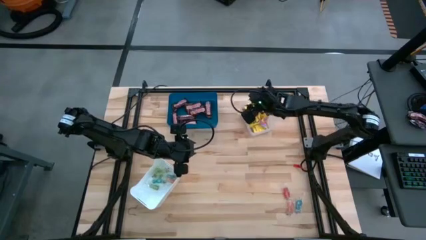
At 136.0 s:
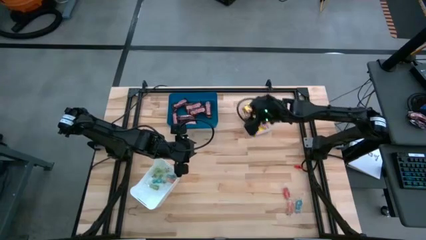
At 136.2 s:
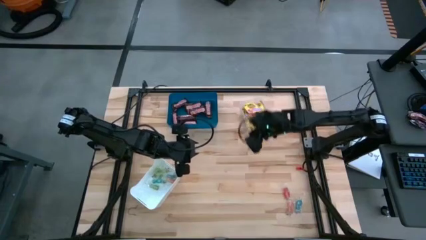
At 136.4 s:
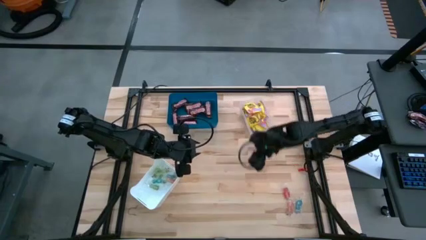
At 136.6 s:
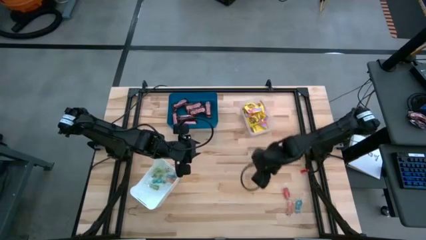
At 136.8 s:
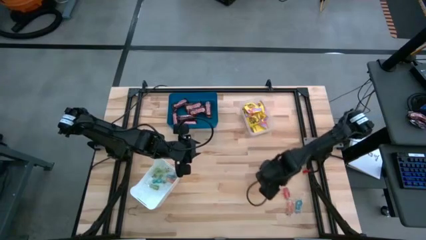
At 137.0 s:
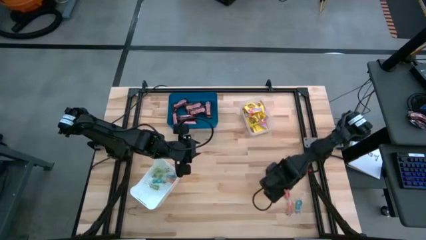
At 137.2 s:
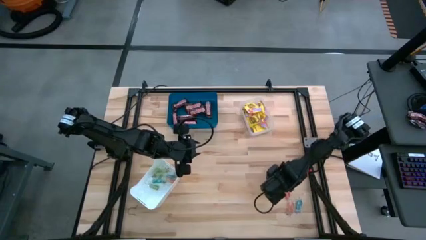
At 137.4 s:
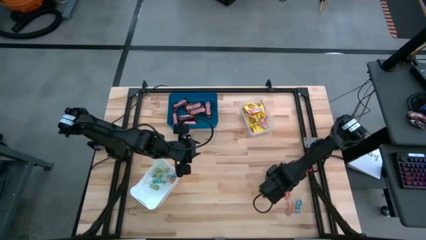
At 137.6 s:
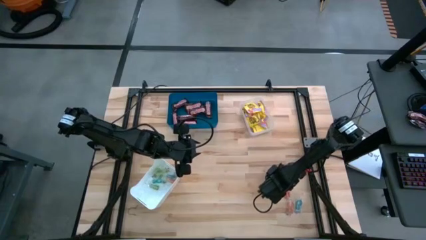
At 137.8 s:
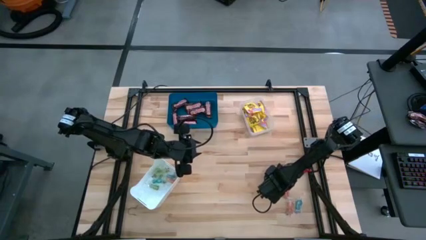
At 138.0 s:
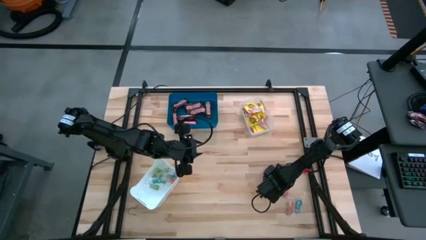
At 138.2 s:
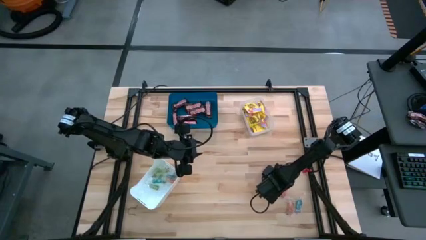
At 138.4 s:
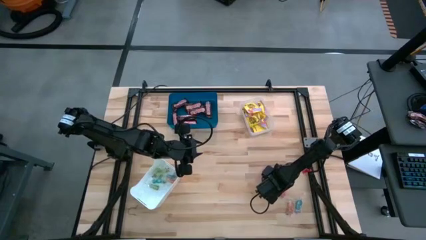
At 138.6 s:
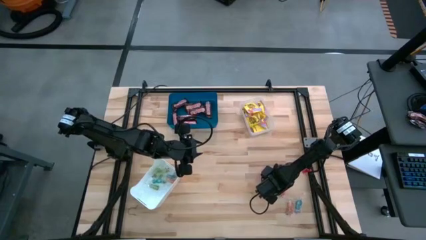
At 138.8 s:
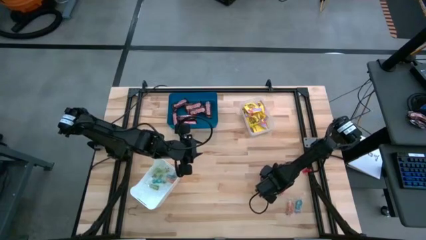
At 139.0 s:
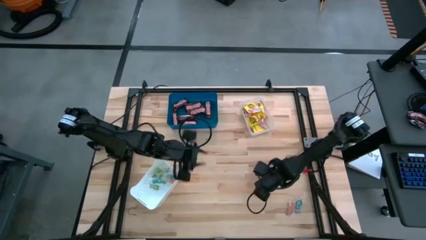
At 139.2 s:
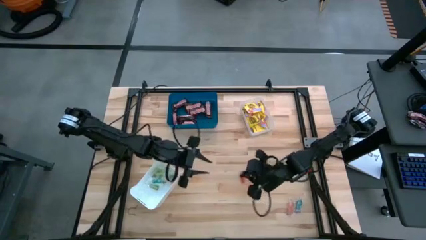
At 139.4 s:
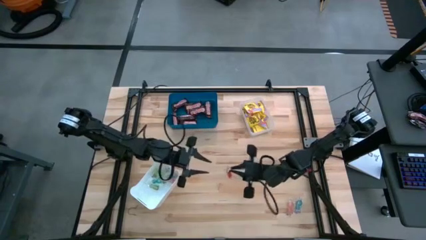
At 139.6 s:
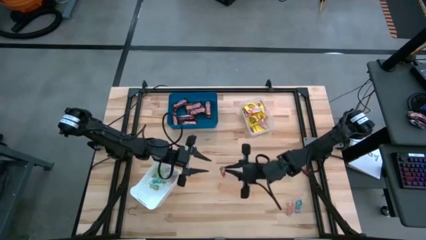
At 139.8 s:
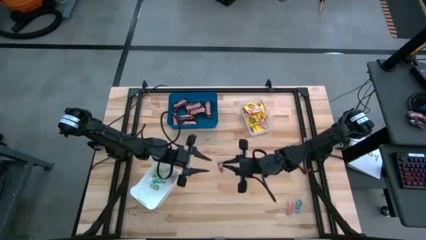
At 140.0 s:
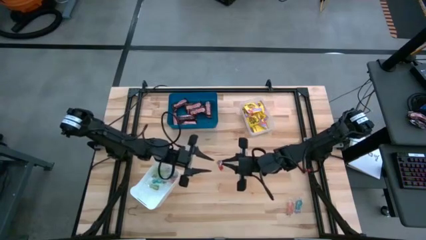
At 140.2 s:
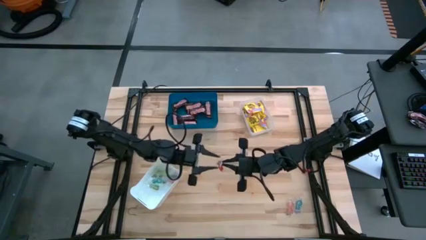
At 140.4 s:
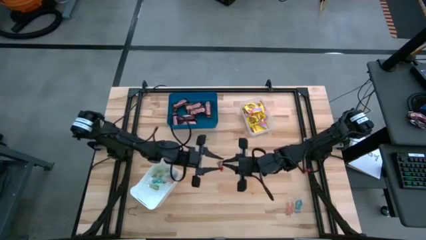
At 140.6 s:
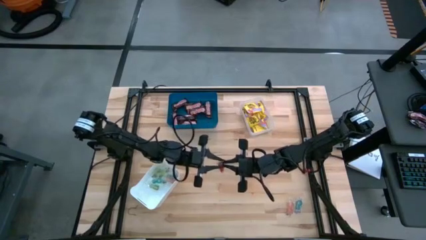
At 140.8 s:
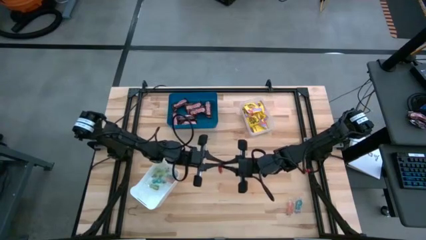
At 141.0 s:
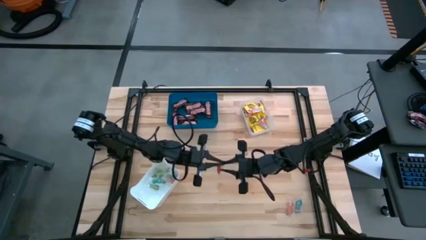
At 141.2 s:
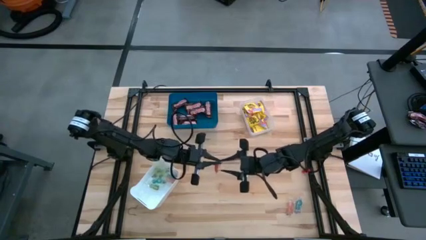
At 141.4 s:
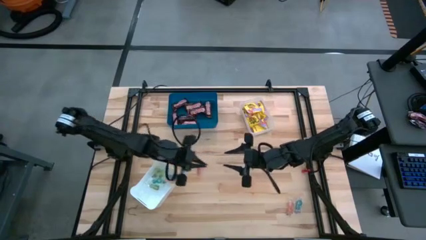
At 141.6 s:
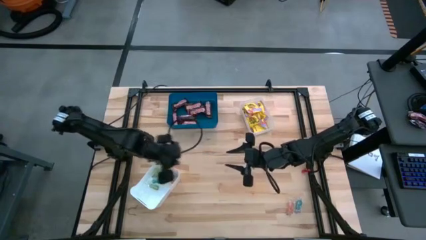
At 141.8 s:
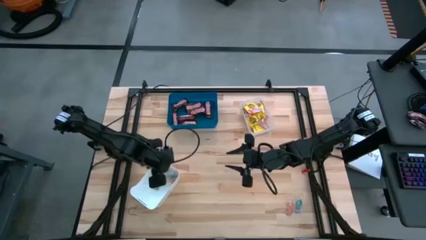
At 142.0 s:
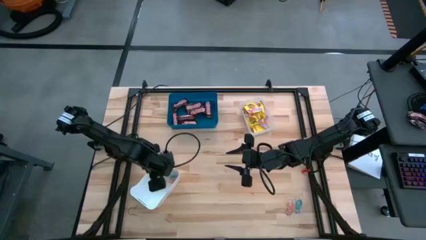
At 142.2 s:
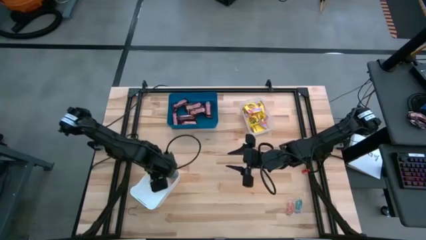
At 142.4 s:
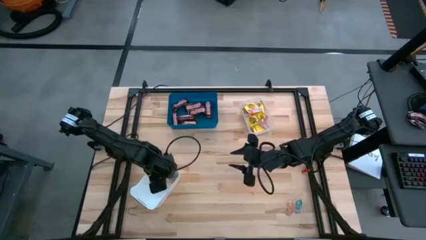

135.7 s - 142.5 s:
Task: Sort candy
Put the red gummy into the white bin

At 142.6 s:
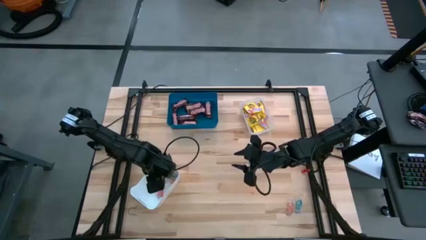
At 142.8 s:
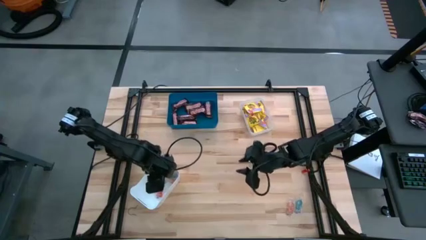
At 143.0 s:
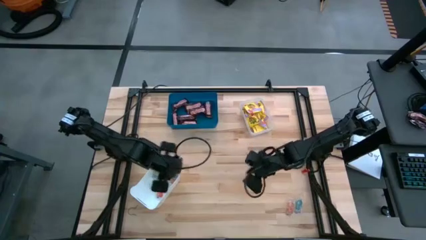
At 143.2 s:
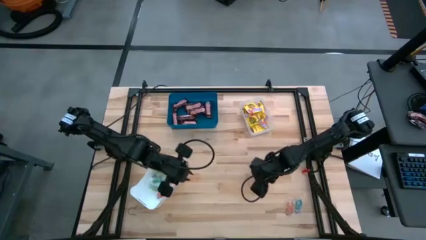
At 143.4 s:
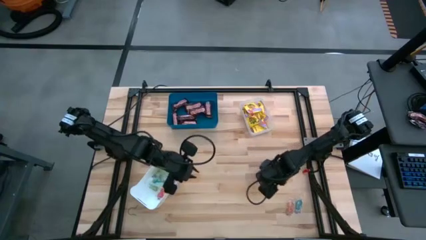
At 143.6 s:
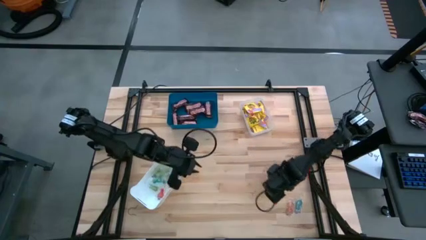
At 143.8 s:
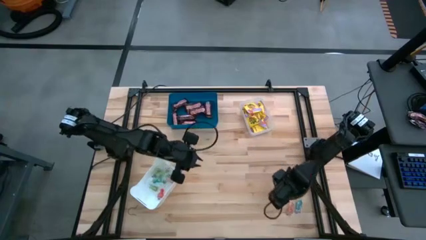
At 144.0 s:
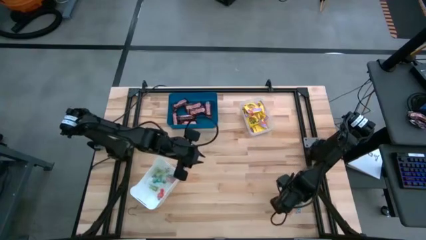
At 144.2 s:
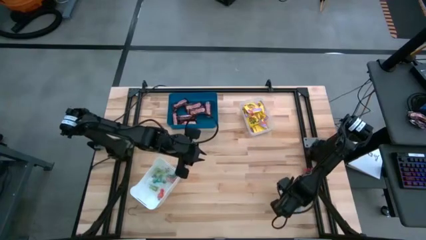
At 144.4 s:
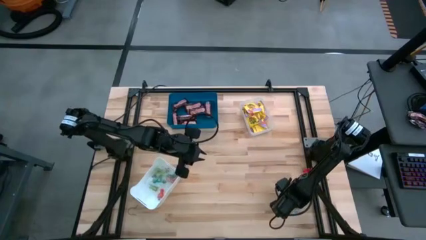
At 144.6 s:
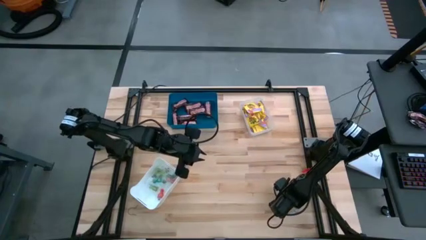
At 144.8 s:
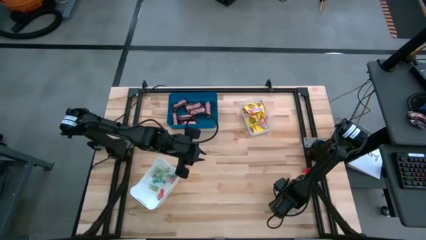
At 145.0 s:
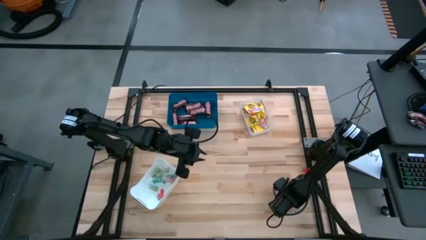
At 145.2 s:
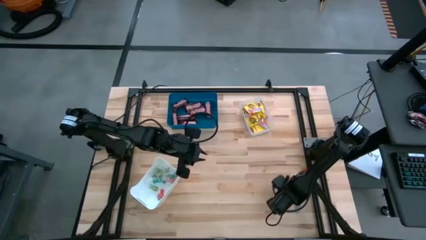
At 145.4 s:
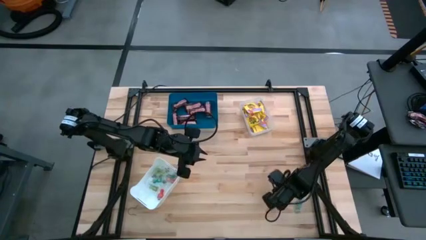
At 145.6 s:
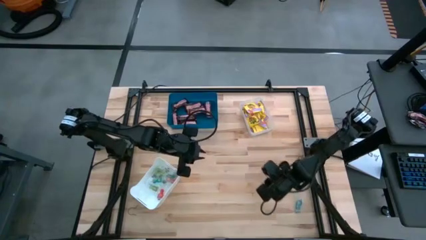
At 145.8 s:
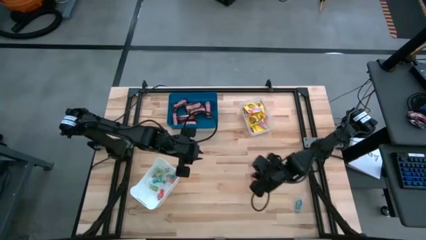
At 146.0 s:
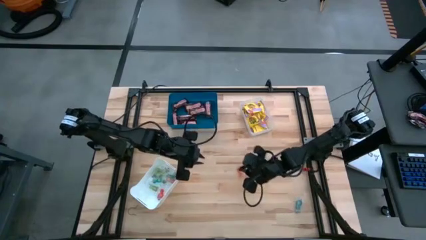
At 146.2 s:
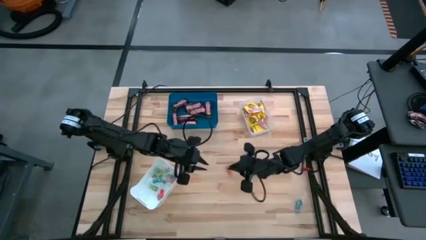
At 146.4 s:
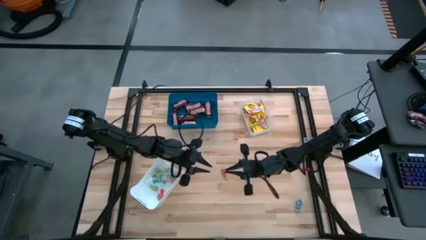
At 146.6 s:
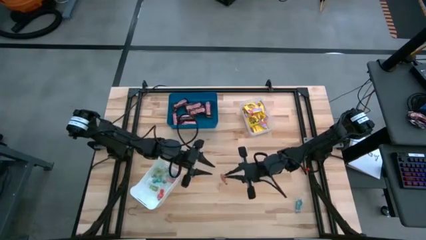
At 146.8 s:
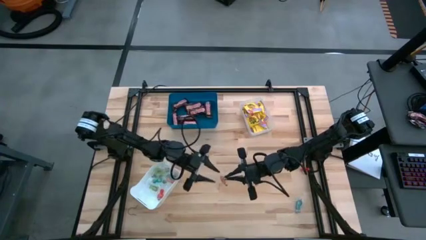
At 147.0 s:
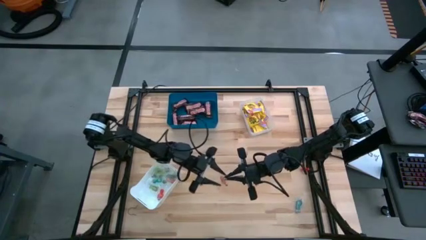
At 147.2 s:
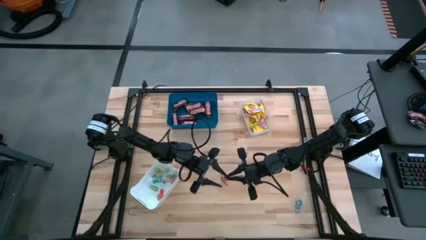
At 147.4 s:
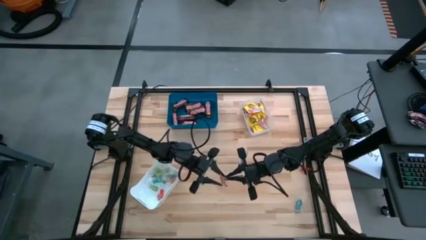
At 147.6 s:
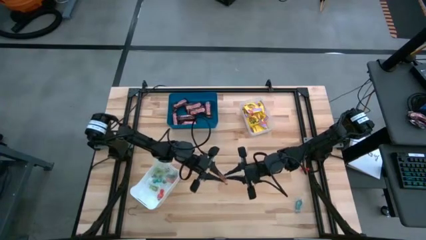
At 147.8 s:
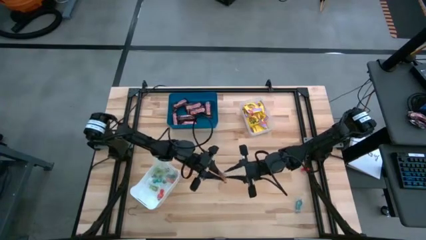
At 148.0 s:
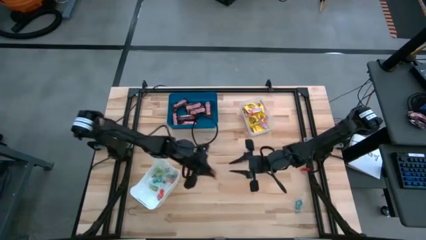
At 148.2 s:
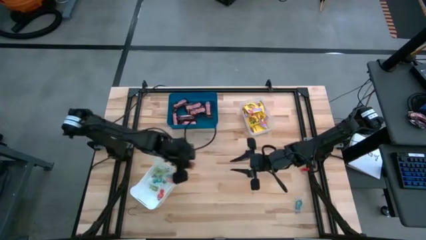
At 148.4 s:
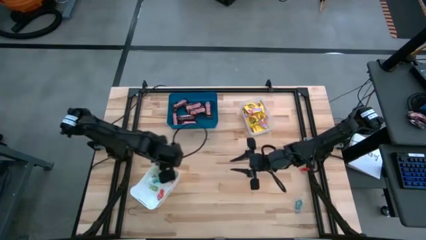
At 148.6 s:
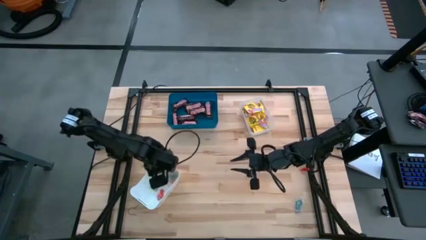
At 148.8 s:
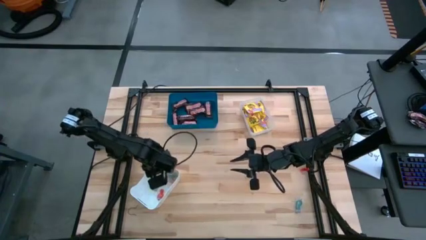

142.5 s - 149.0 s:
Put the orange gummy into the white bin

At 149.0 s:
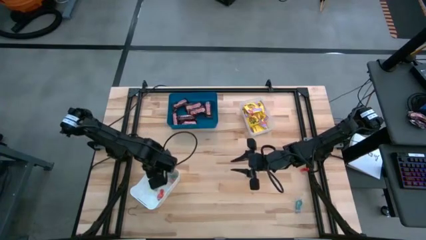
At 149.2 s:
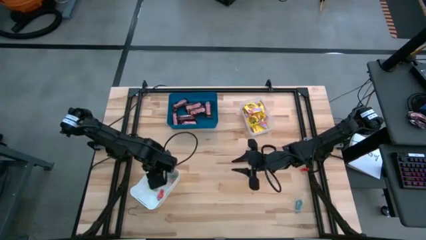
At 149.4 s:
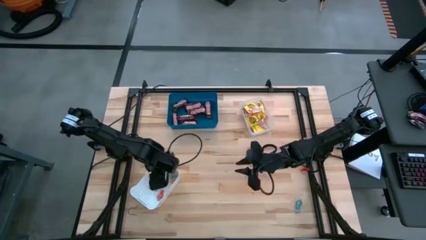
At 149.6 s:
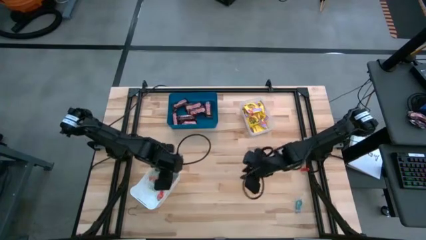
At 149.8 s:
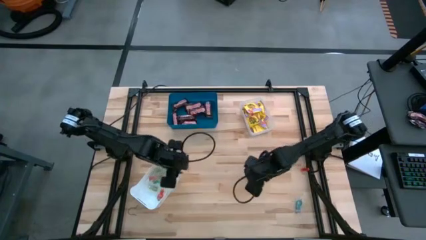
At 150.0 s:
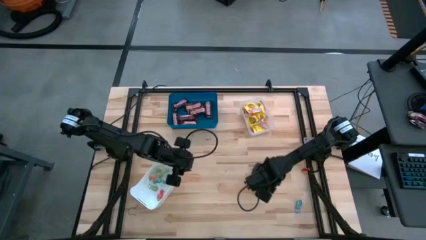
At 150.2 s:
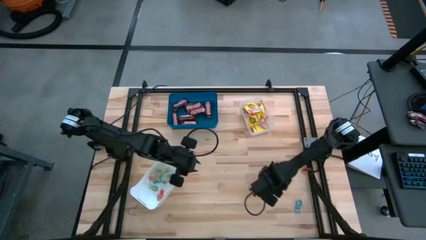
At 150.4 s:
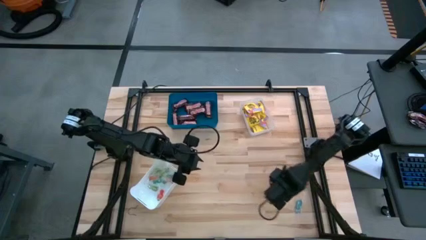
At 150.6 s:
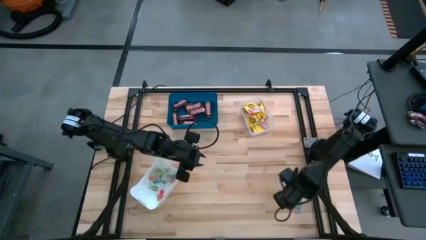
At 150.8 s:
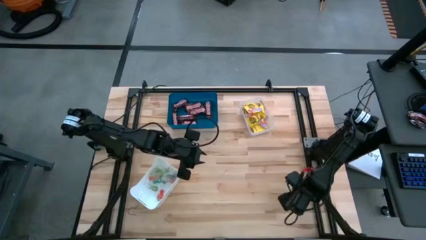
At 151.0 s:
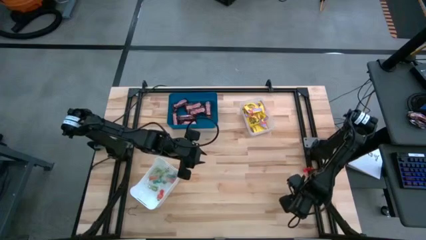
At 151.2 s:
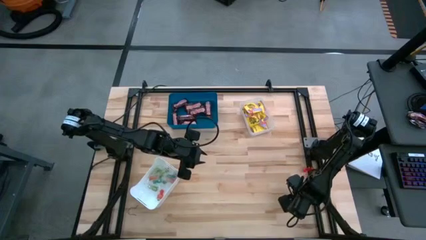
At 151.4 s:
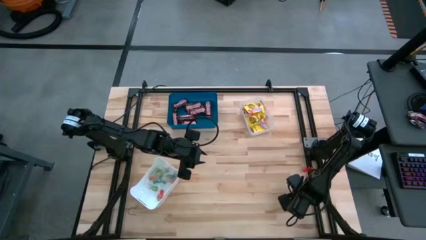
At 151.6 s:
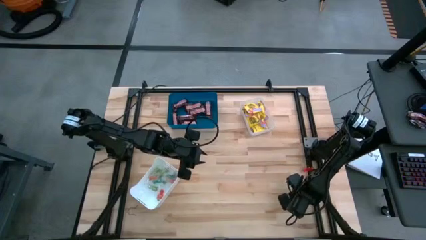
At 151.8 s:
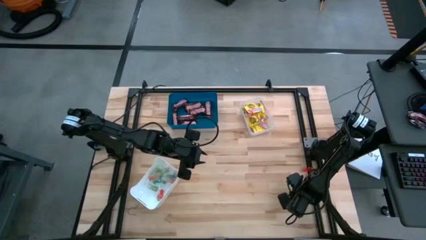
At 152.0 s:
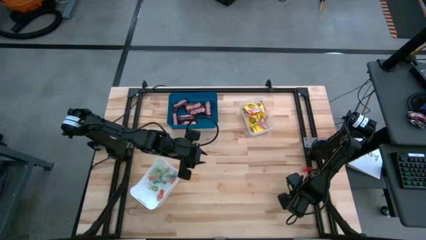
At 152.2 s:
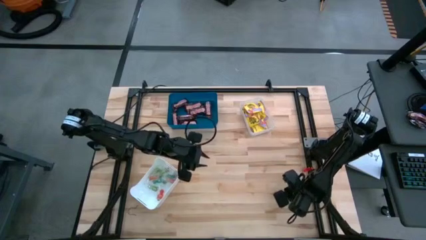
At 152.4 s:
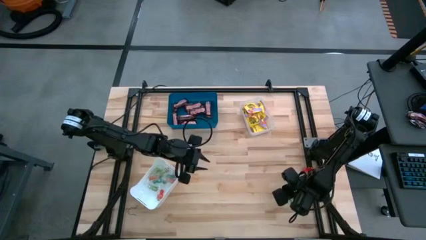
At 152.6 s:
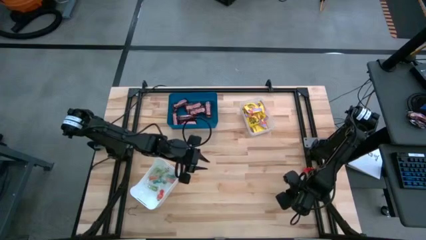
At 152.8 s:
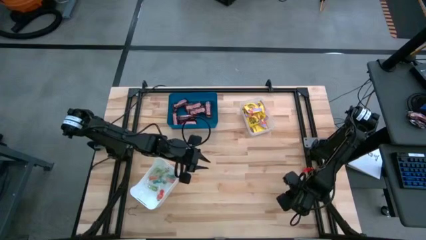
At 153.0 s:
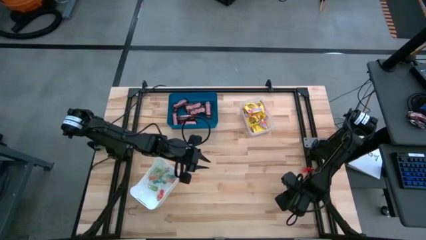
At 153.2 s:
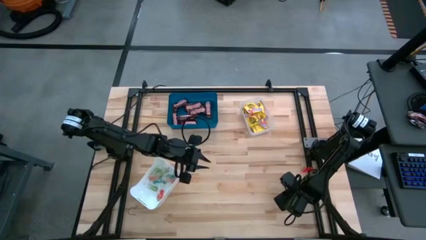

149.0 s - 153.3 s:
Put the blue gummy into the white bin
